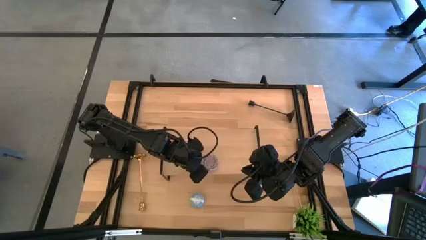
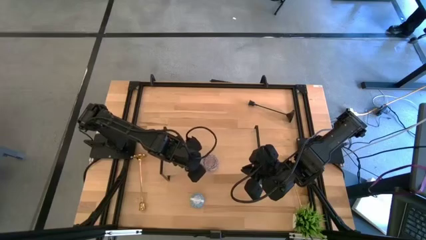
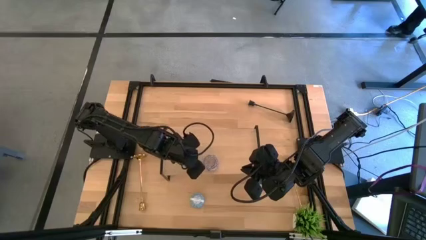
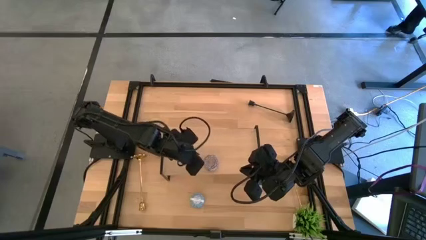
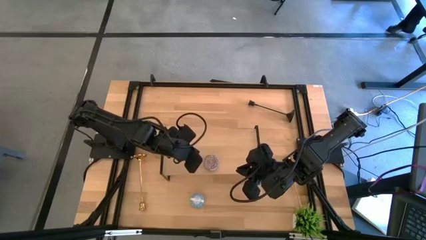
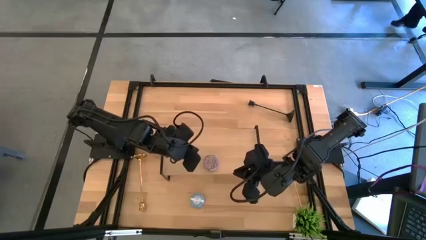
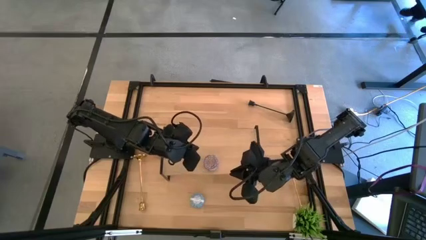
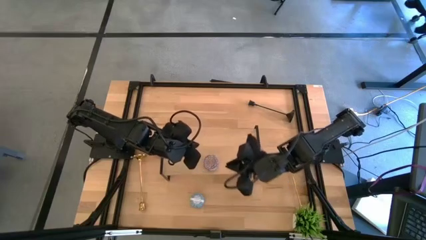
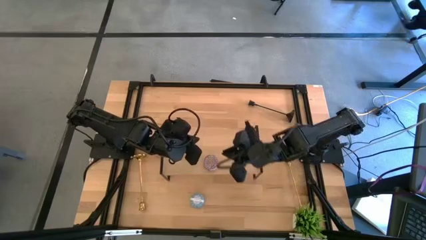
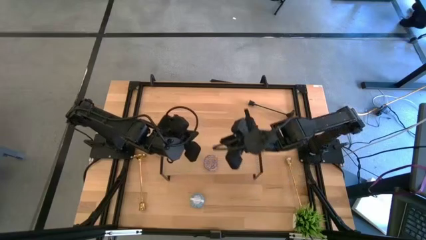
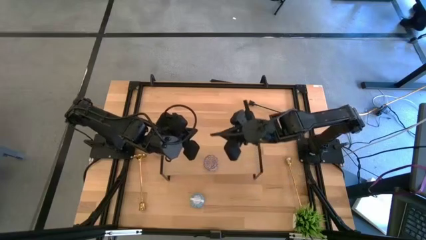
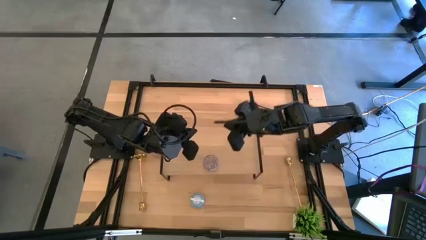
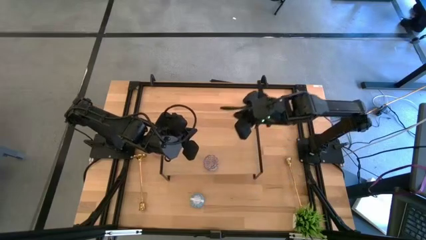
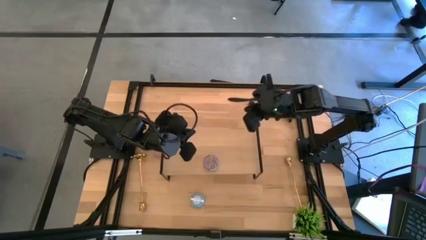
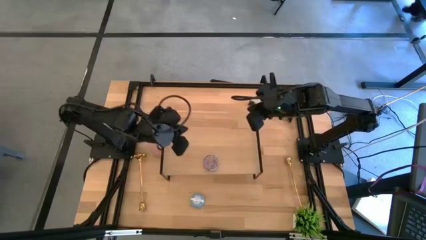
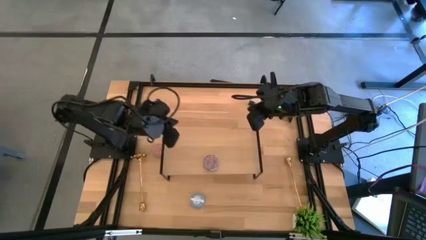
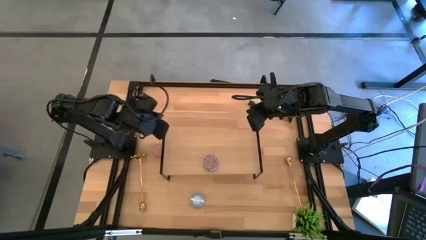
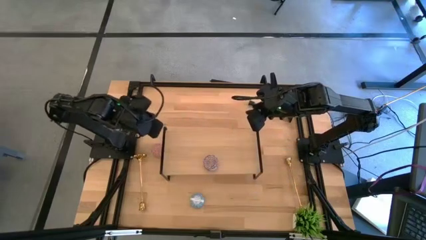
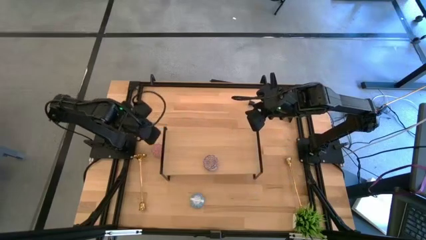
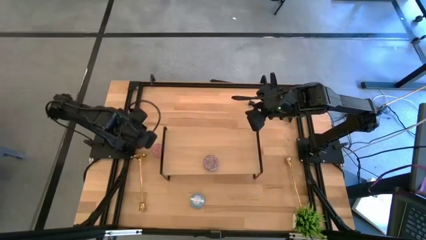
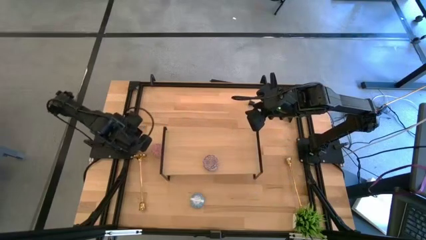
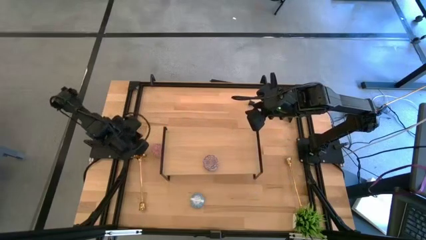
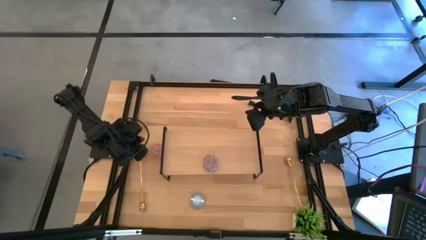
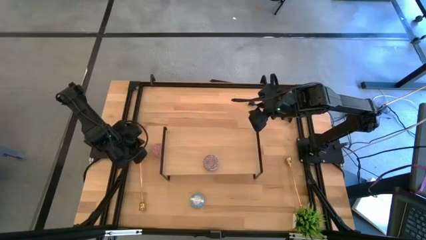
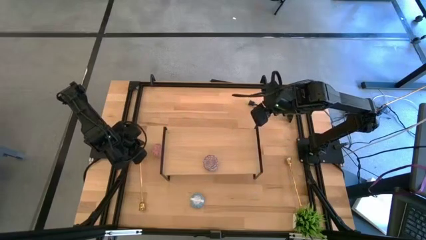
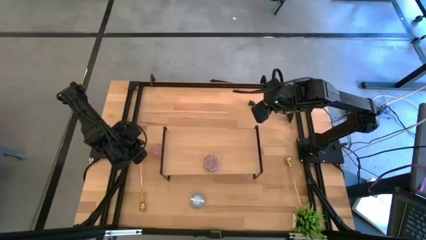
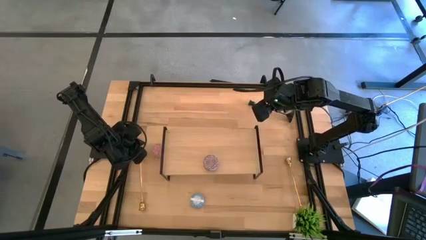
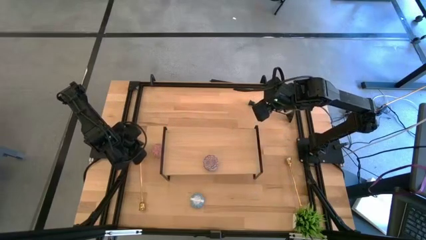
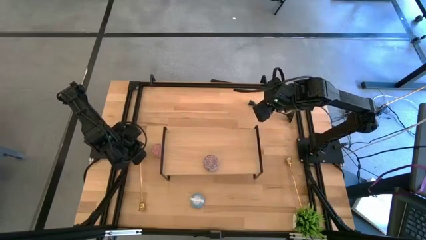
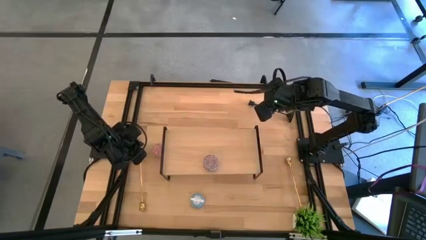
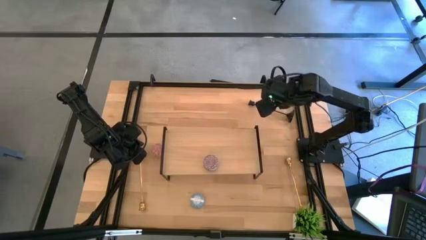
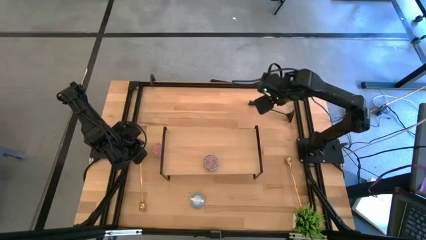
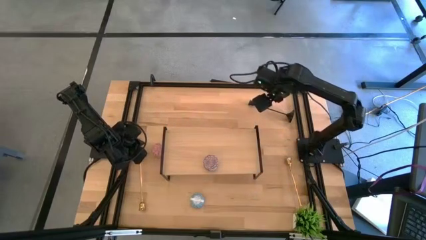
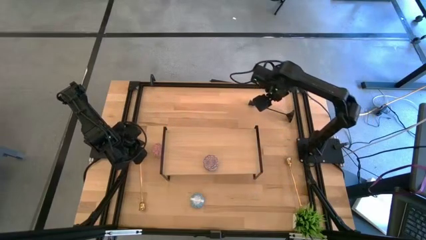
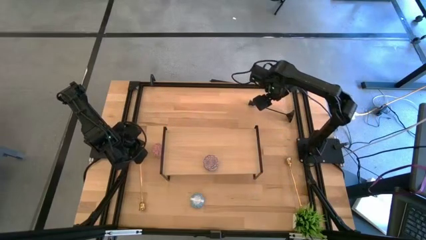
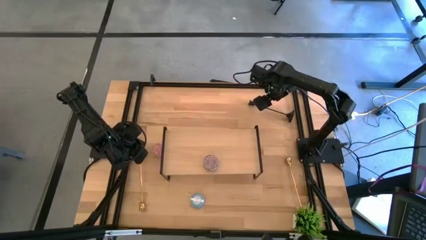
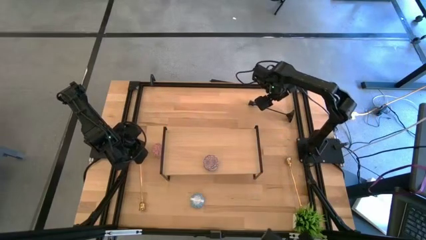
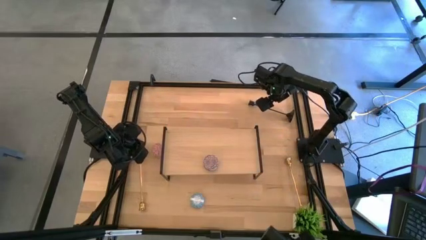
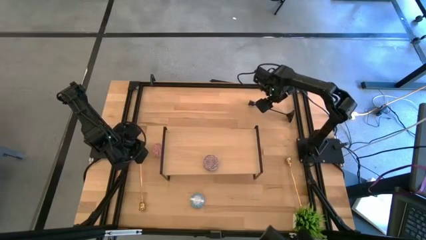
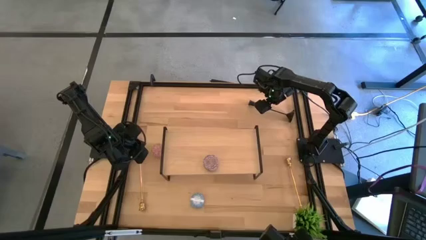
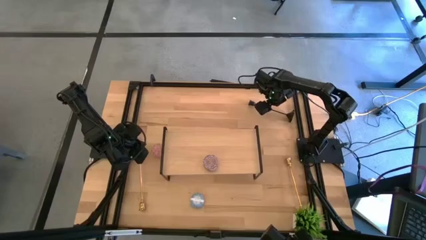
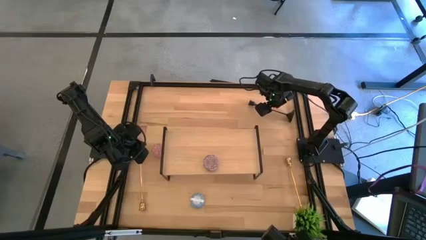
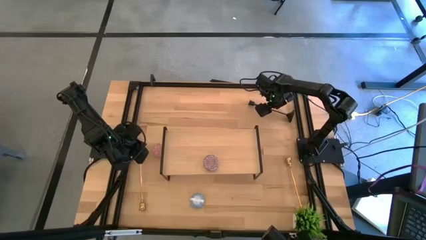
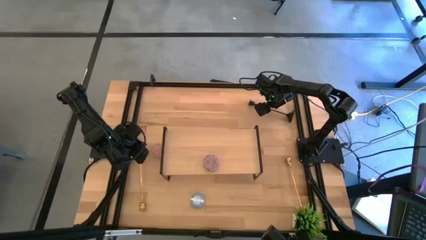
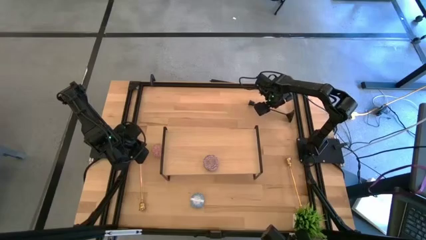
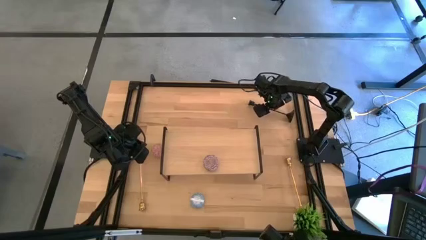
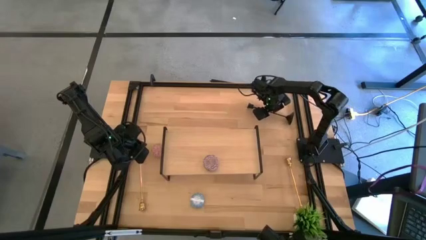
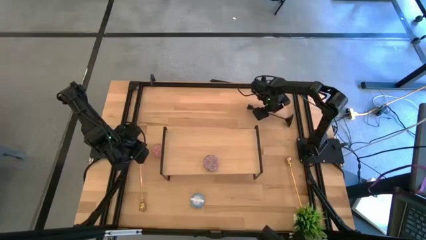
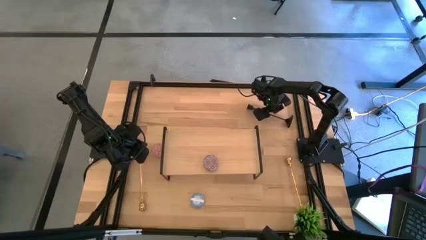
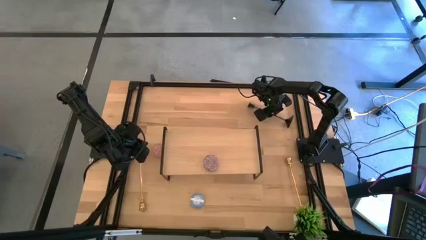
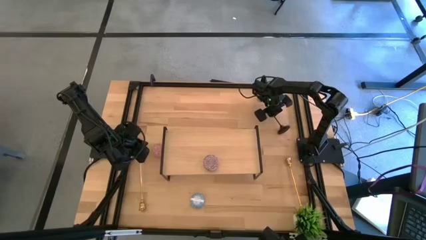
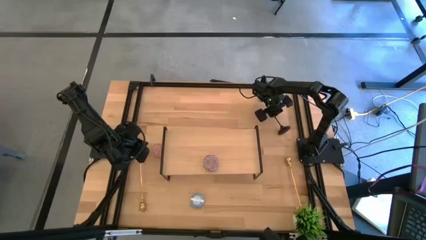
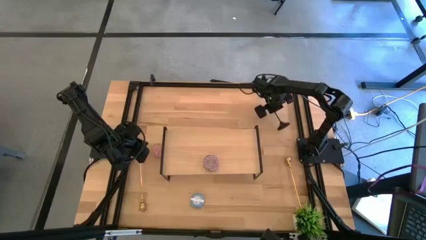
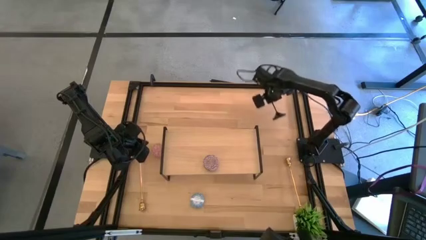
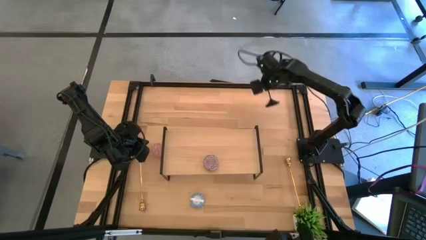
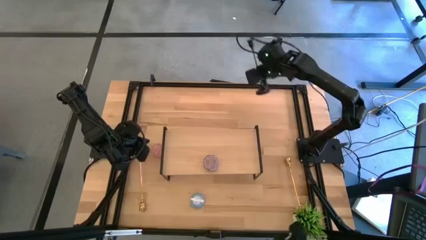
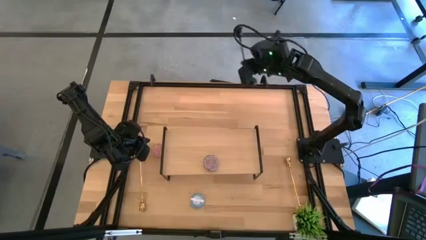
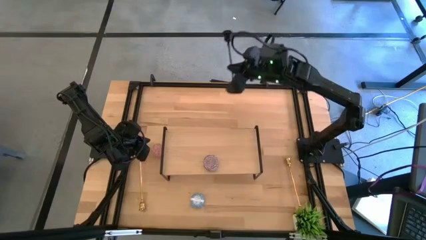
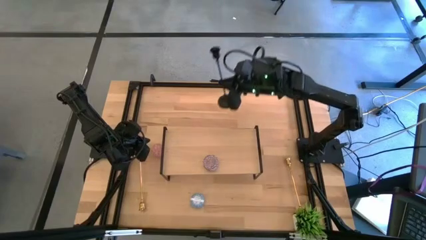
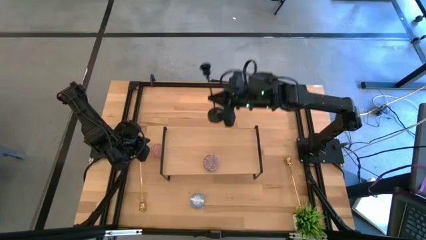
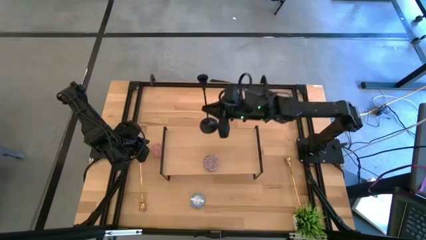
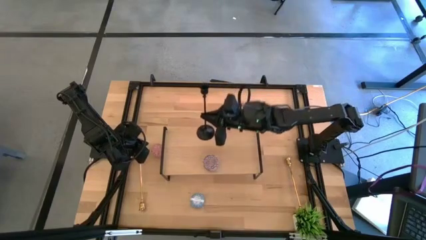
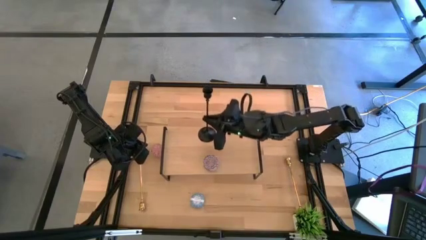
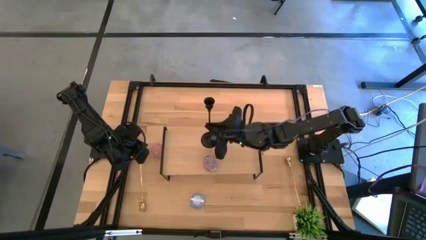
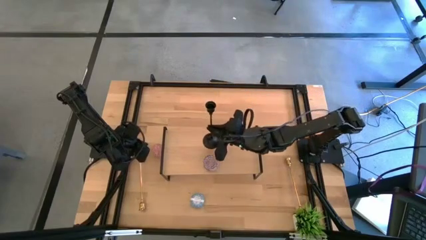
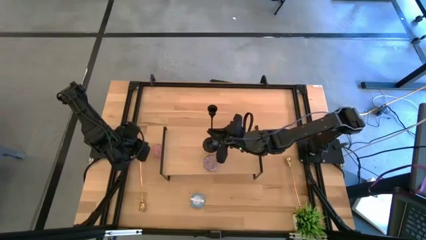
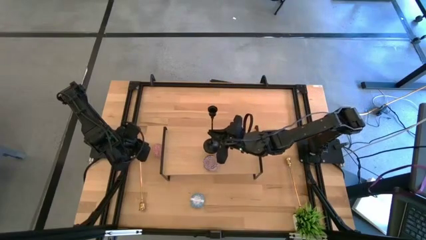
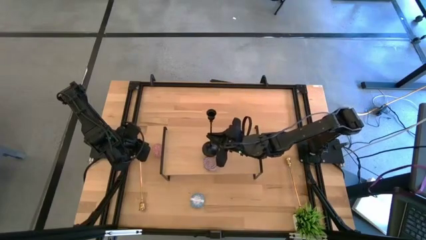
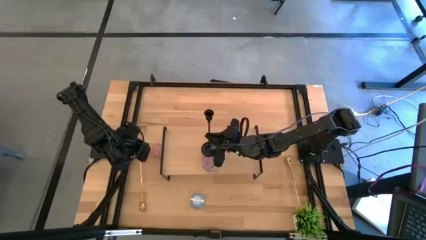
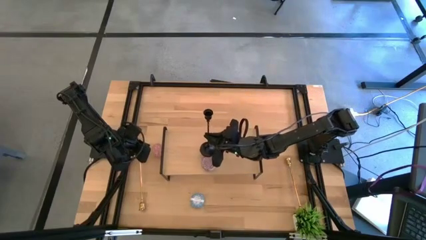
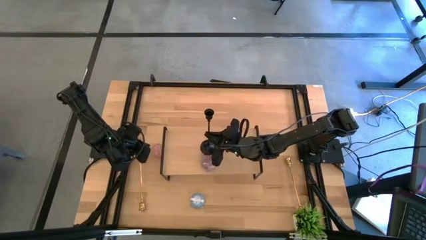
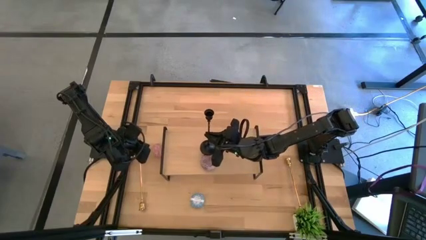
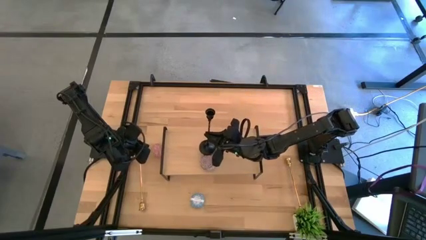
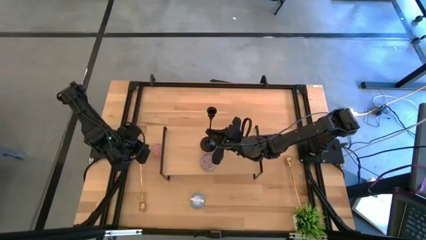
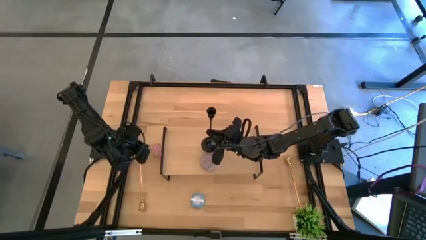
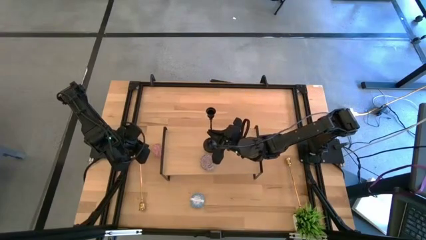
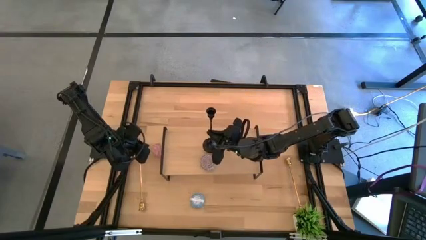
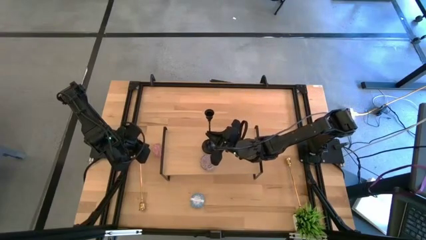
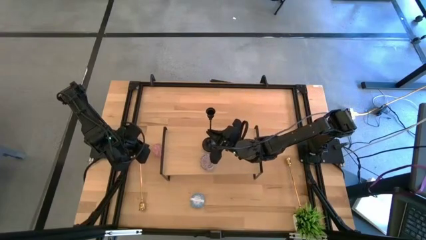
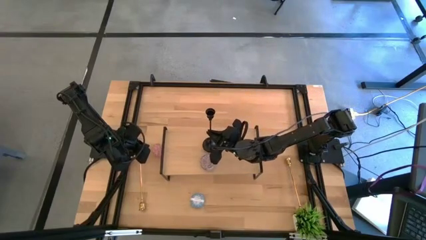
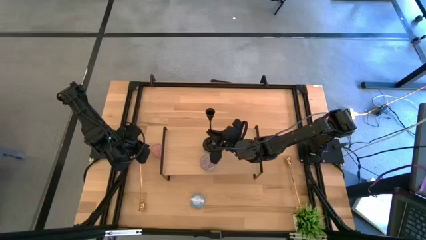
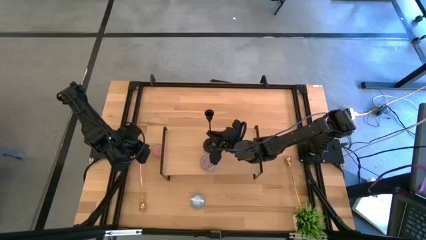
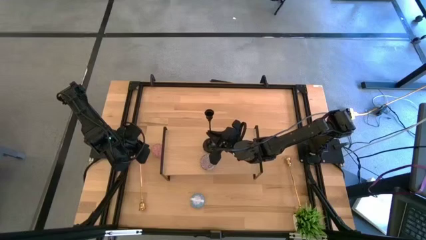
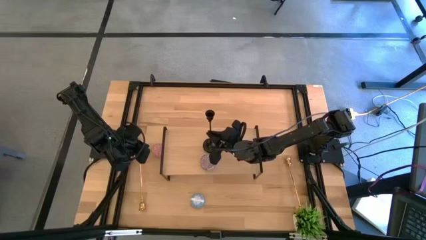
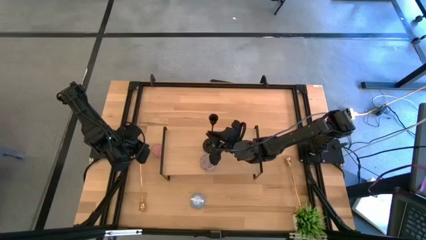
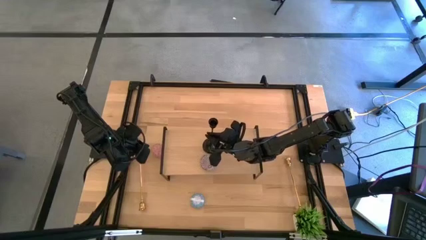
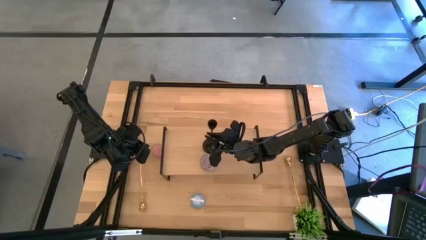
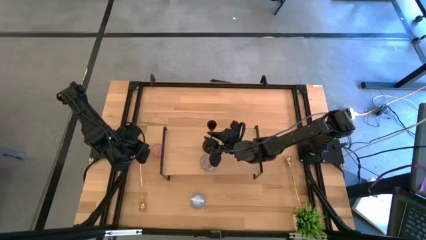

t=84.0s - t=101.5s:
Task: Pick & Place candle stick holders
Put the black candle holder on the shelf
